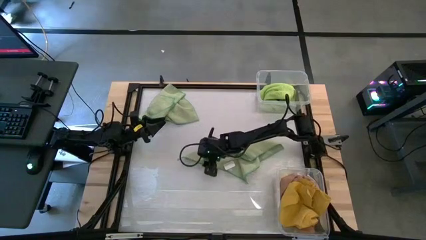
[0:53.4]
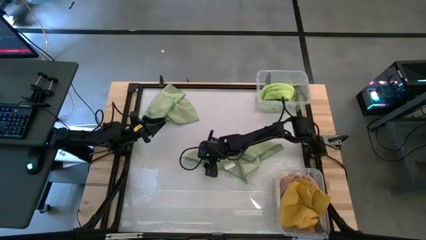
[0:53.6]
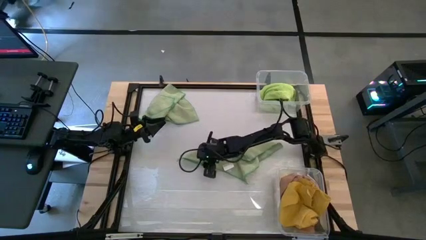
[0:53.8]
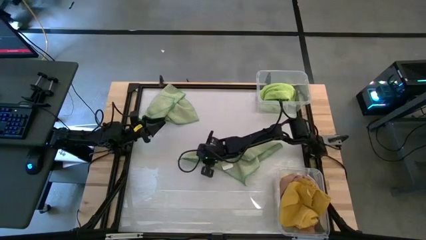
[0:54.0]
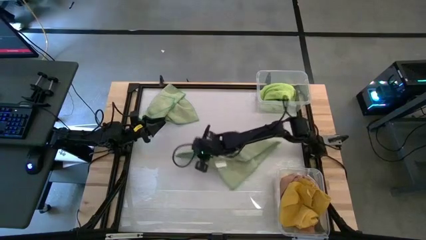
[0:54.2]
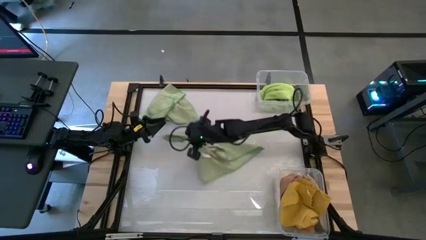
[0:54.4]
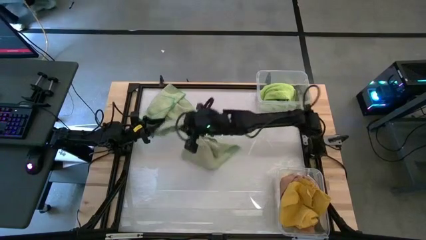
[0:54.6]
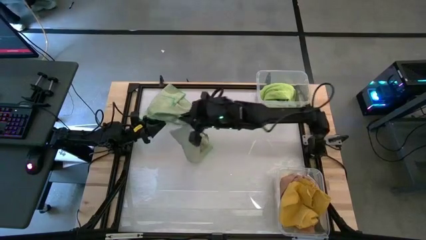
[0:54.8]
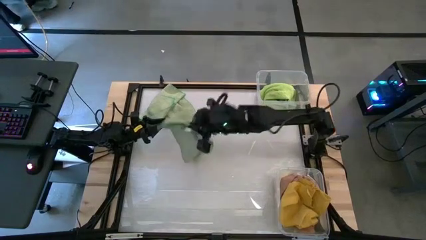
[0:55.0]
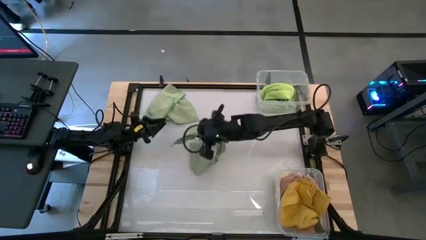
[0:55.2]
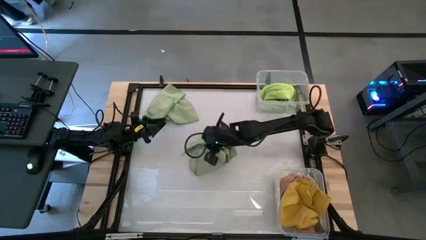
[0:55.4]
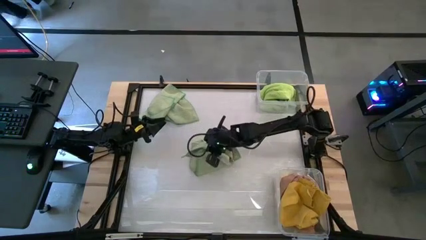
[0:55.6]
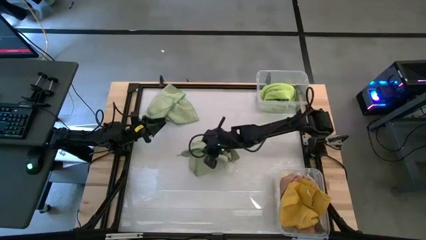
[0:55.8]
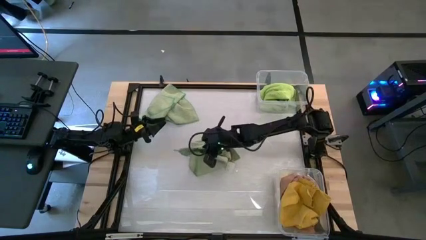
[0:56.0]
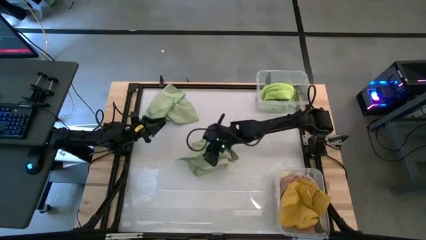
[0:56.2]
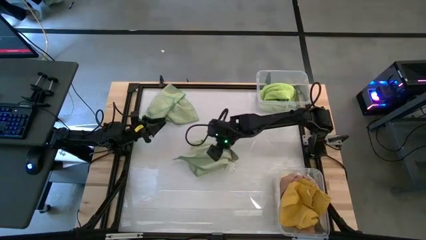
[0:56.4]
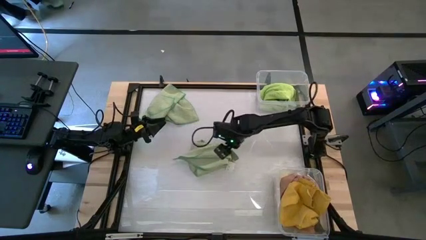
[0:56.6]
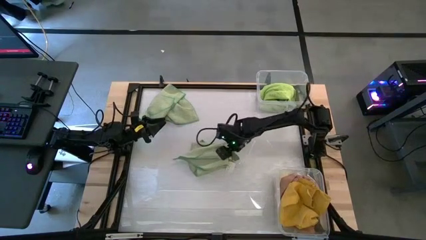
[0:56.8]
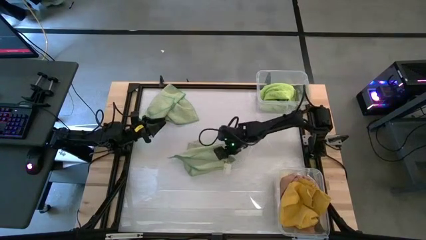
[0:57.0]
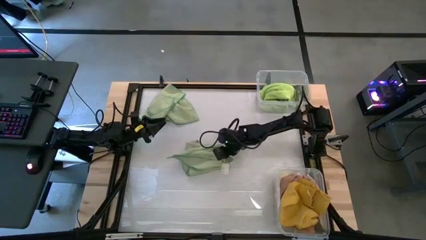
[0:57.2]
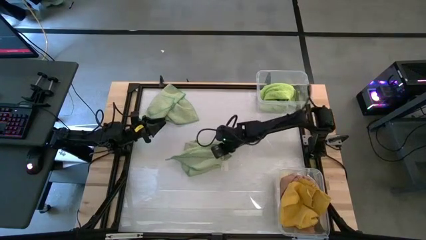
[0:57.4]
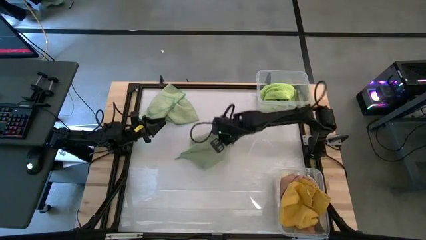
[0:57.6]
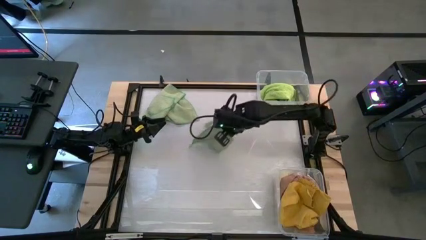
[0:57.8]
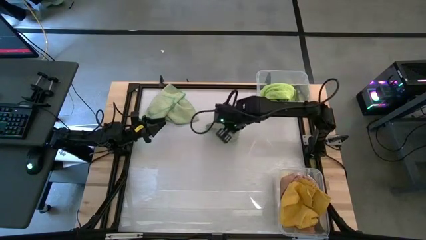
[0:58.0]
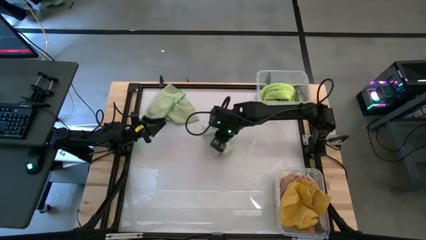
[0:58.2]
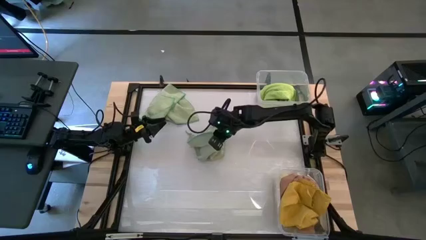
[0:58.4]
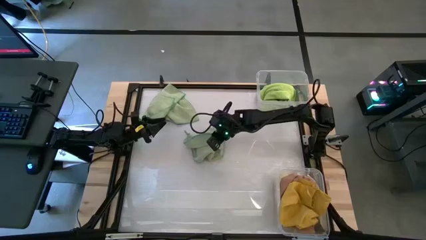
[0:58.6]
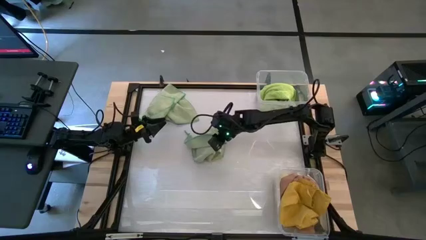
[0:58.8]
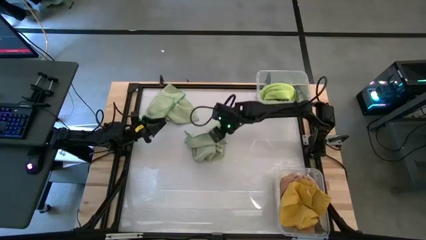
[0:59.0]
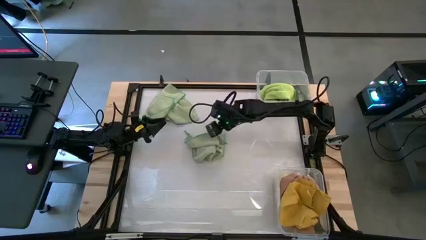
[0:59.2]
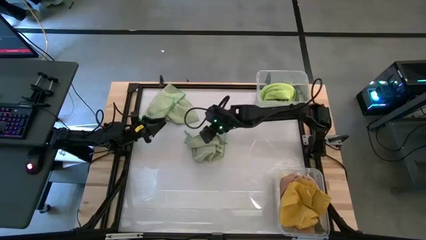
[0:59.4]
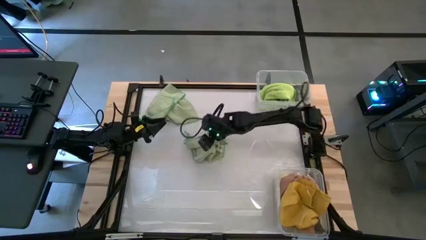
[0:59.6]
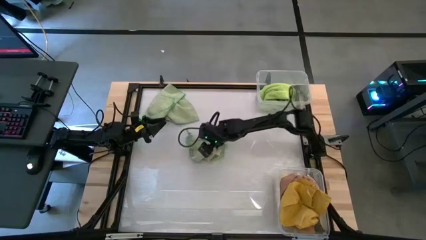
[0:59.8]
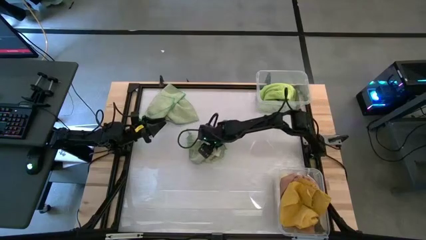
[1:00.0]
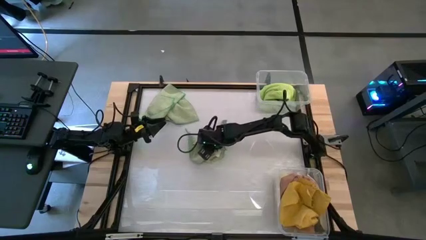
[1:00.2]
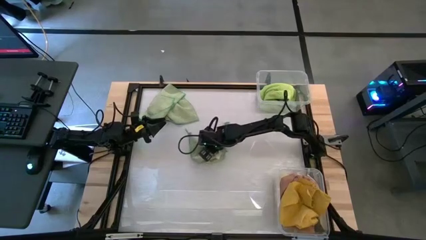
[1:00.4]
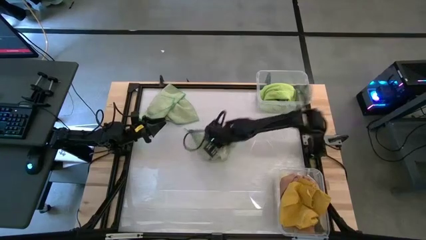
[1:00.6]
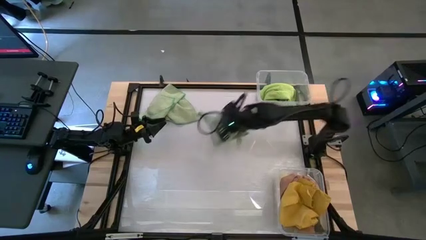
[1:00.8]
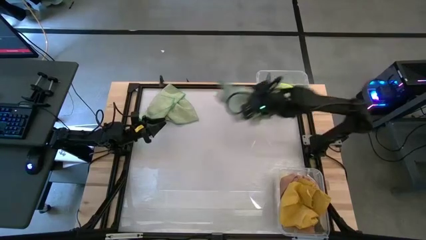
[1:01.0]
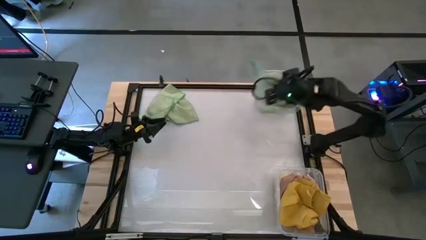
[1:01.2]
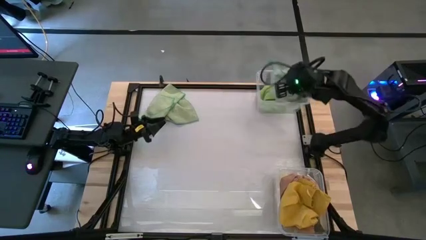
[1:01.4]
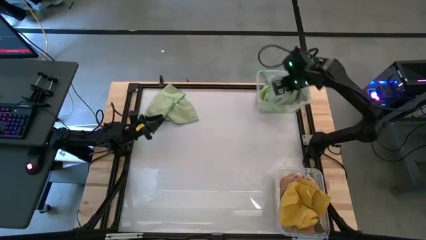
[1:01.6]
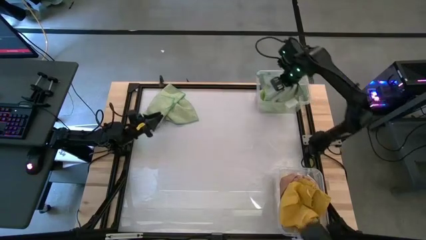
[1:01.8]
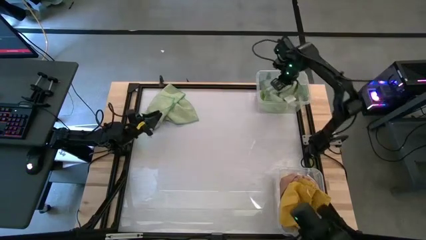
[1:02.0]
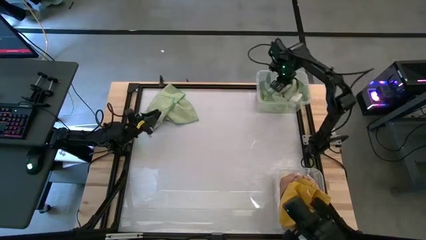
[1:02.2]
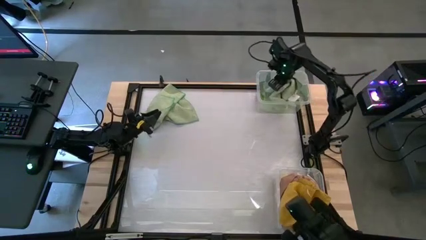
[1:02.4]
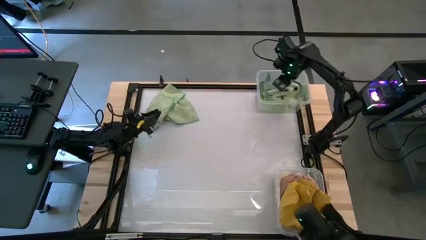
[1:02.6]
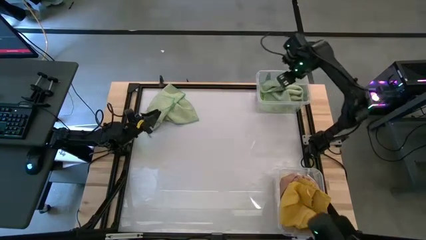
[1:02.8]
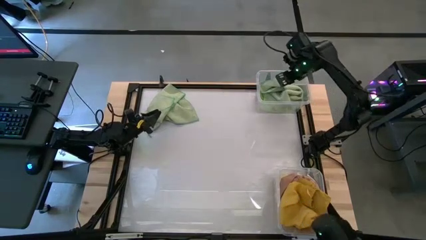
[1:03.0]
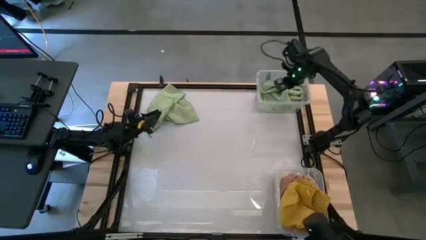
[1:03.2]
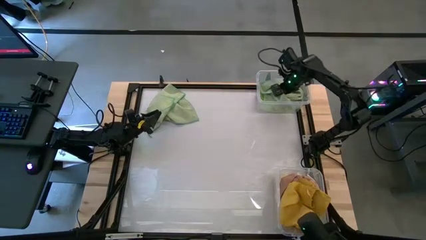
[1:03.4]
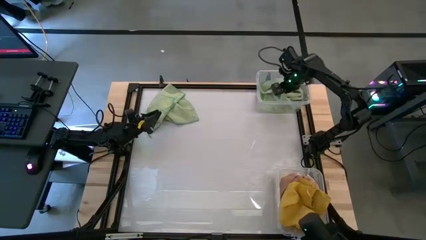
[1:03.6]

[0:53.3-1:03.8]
Task: Sort towels by color in basket
Put the bottom light green towel into the top transparent bin
